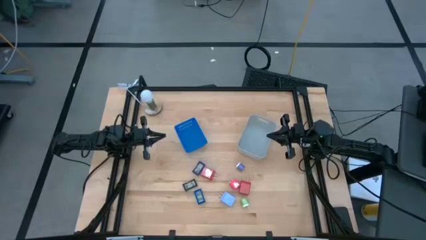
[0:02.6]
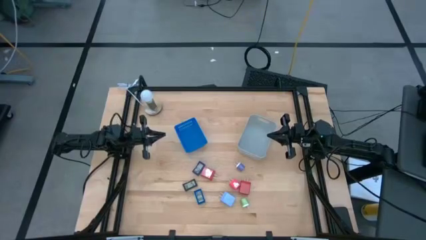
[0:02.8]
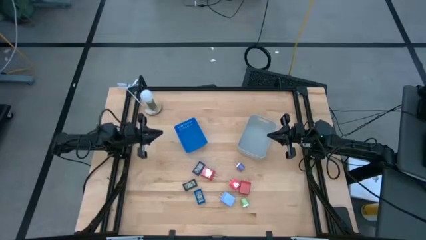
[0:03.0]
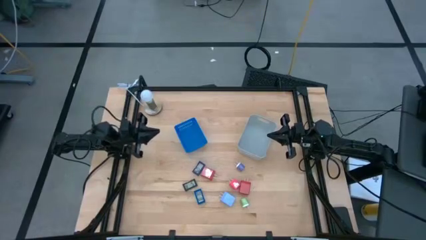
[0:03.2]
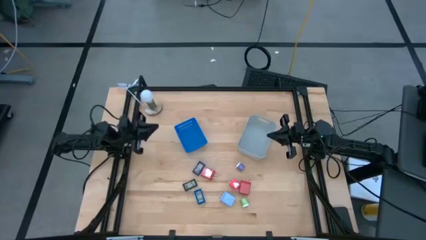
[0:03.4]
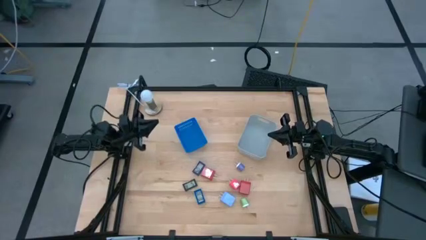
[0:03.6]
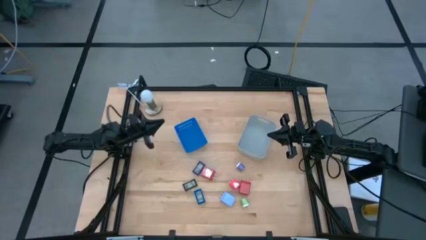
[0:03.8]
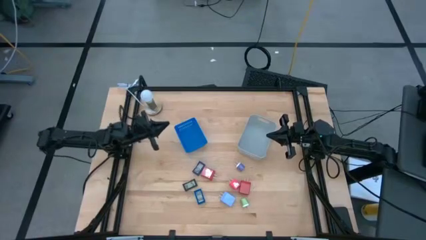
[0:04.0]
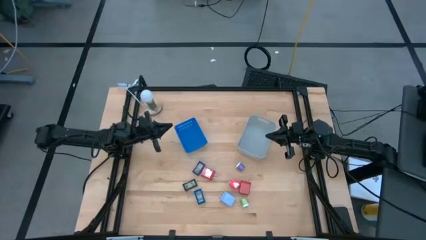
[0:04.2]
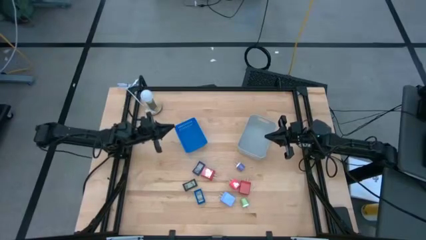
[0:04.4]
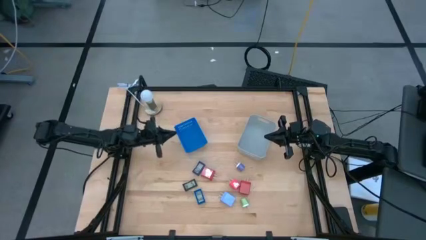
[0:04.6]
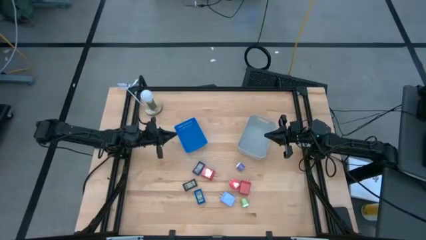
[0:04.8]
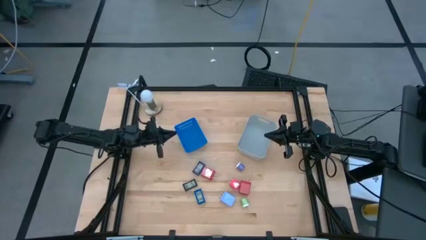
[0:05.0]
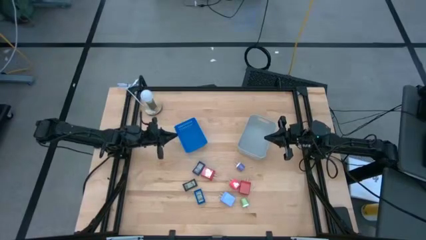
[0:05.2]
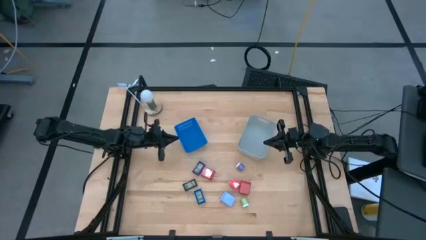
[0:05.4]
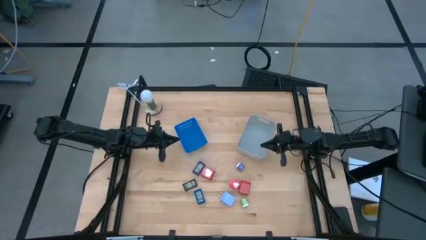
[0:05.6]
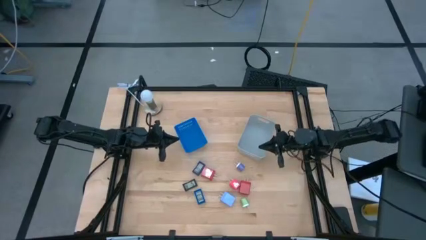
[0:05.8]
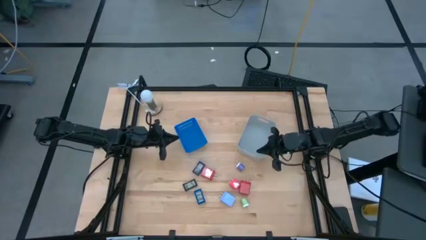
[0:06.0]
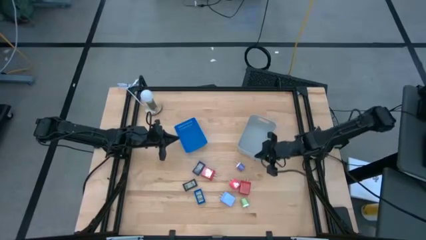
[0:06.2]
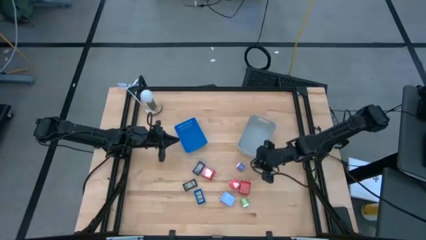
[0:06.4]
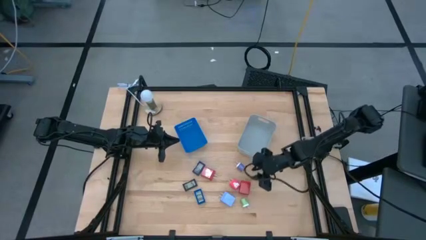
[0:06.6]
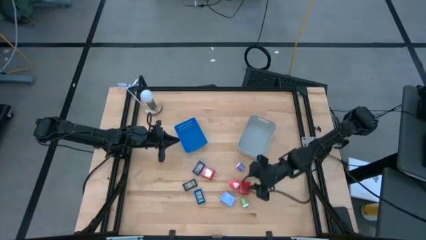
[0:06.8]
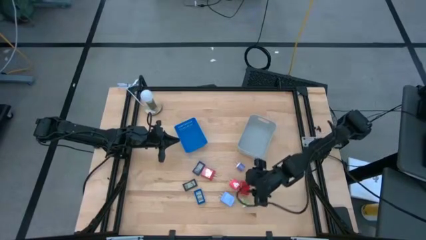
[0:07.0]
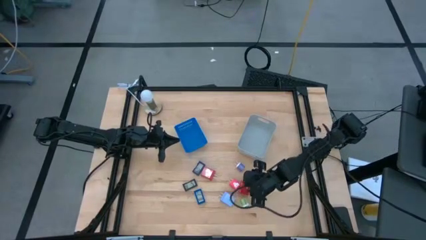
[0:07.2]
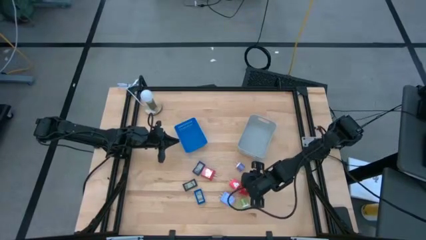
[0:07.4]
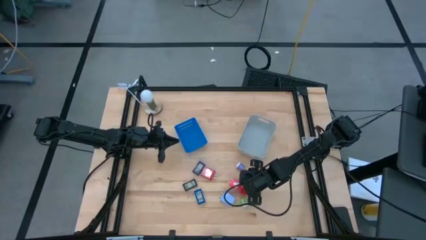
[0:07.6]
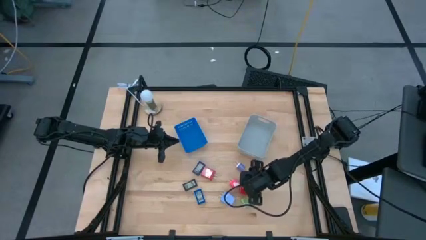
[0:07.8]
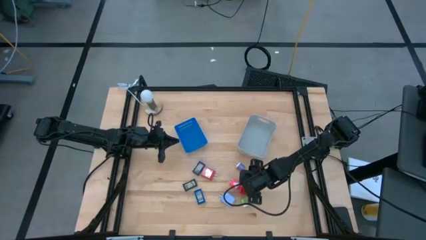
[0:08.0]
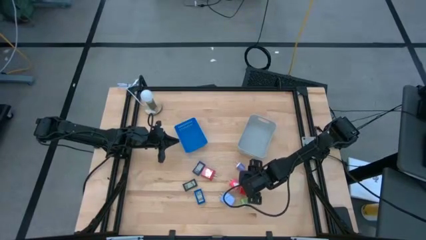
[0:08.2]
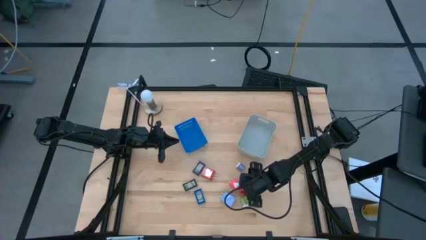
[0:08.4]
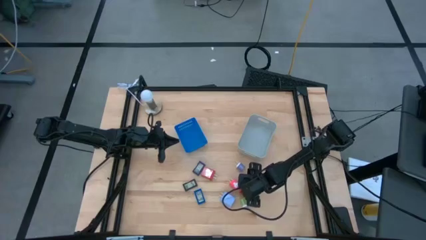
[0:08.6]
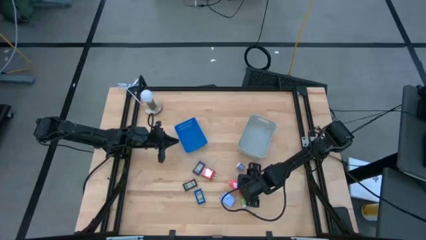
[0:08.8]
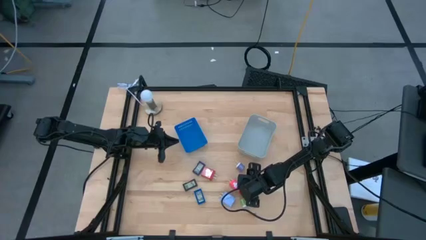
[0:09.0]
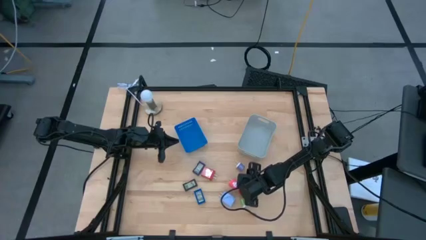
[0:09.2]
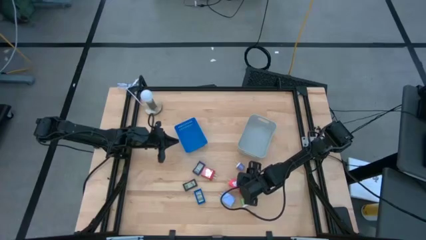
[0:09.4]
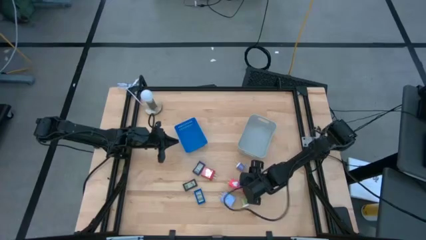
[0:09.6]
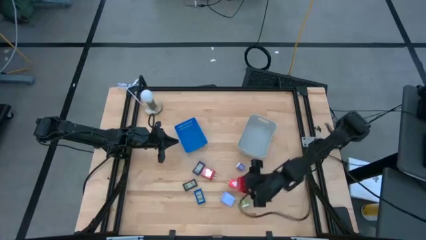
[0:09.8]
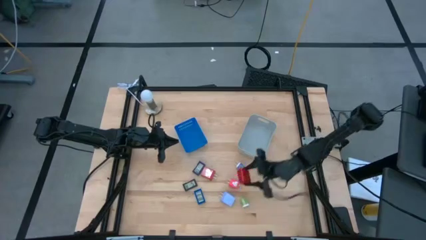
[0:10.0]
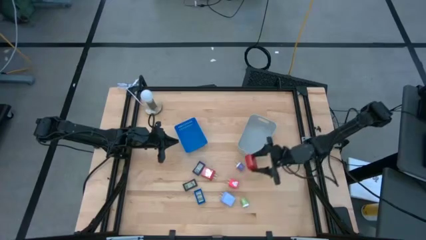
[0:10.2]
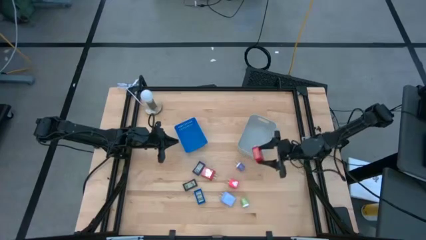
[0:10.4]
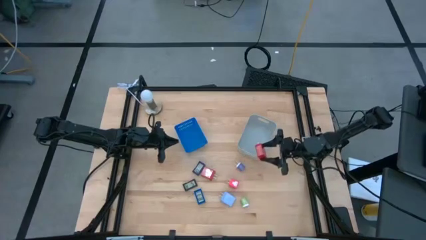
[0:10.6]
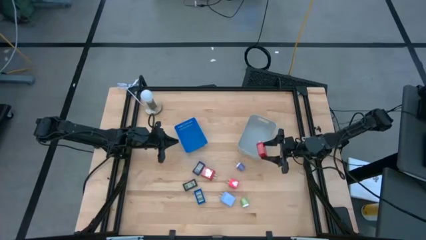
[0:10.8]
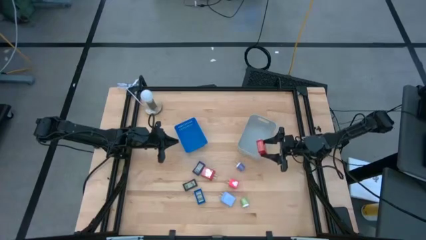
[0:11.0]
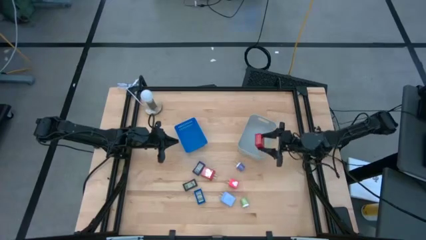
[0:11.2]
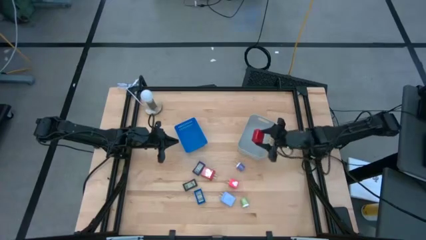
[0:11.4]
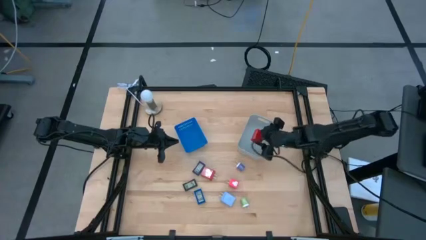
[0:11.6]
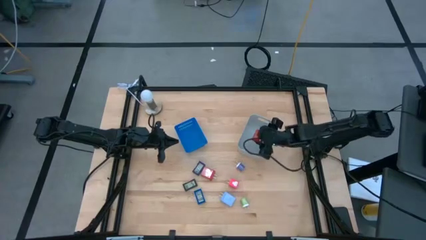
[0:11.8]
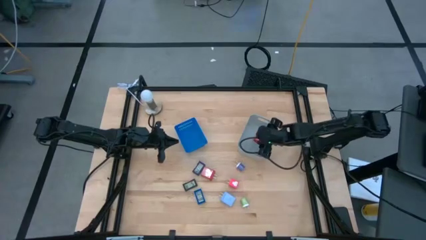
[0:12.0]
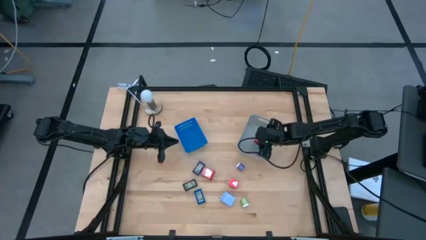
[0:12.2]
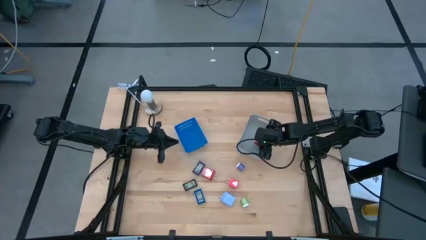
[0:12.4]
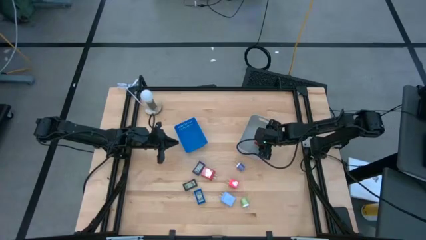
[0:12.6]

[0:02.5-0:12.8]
Task: Pick & Place Office items
Put the right red charger adapter into the gray bin

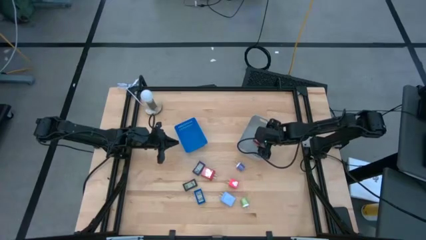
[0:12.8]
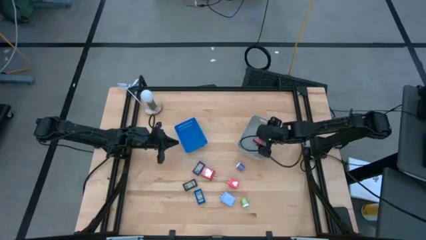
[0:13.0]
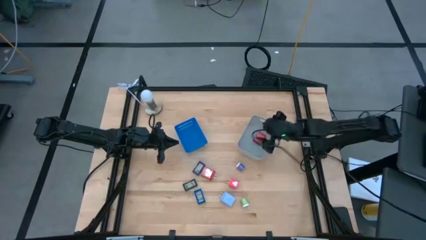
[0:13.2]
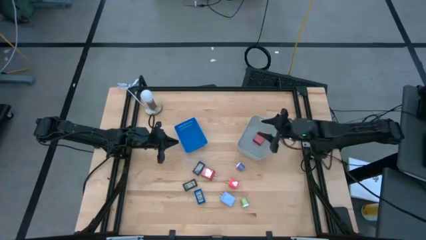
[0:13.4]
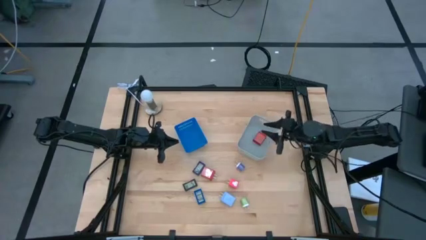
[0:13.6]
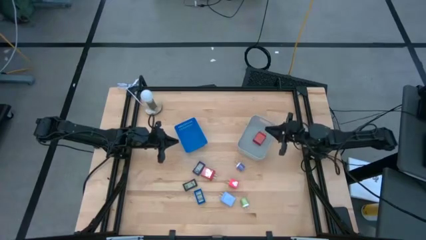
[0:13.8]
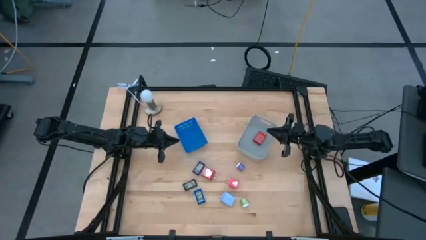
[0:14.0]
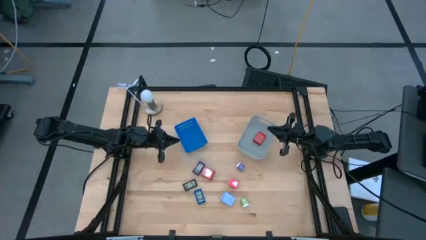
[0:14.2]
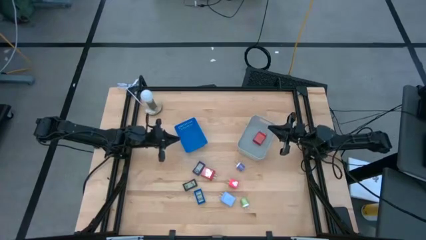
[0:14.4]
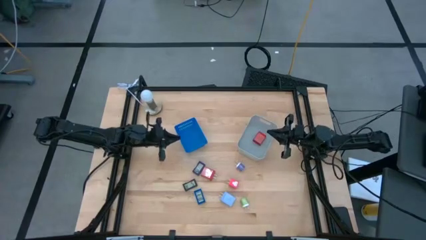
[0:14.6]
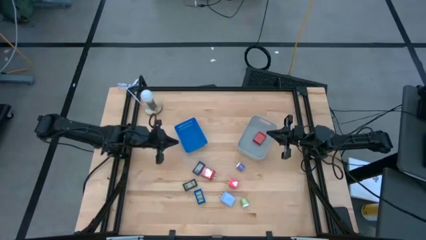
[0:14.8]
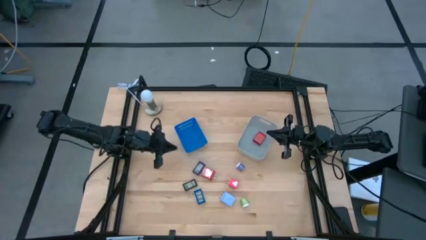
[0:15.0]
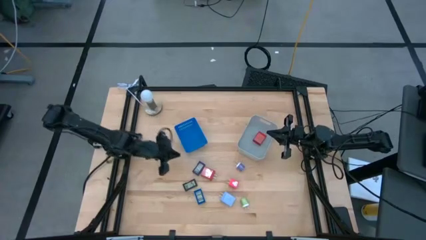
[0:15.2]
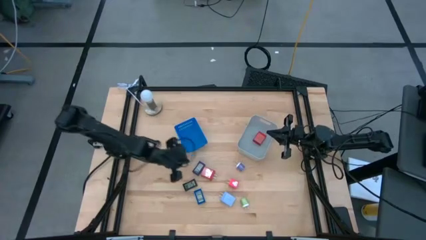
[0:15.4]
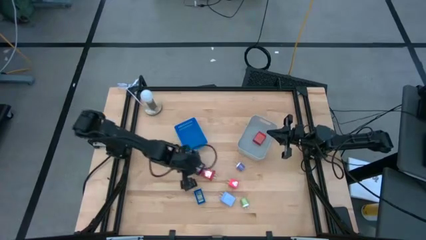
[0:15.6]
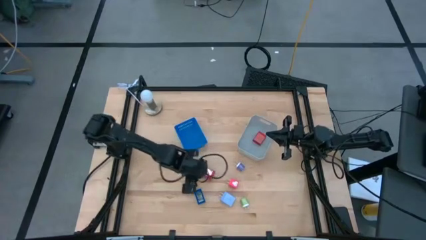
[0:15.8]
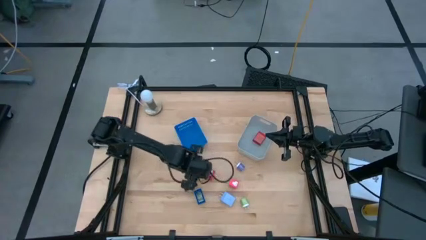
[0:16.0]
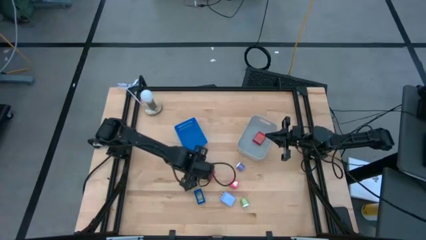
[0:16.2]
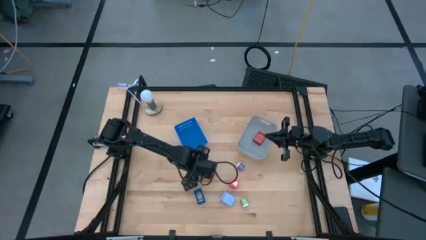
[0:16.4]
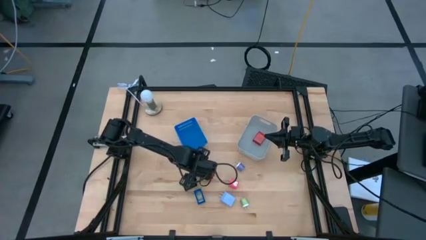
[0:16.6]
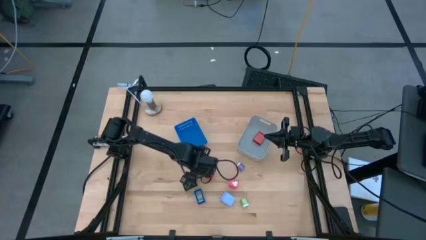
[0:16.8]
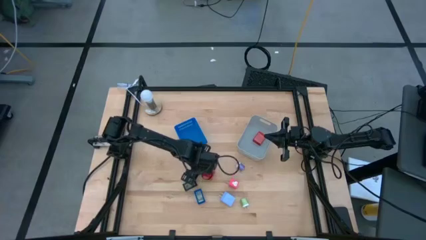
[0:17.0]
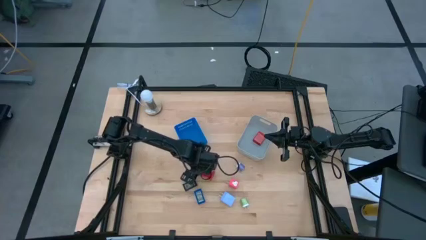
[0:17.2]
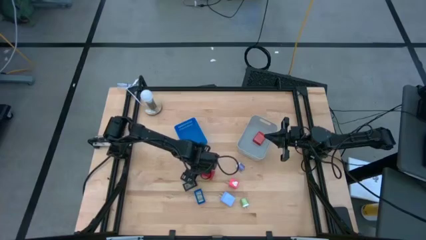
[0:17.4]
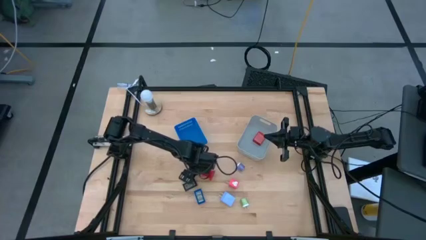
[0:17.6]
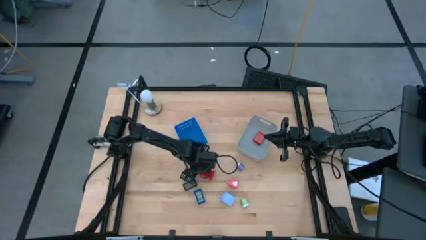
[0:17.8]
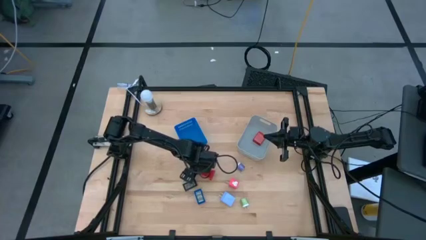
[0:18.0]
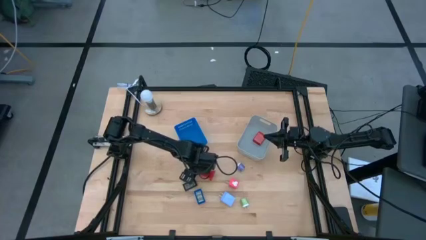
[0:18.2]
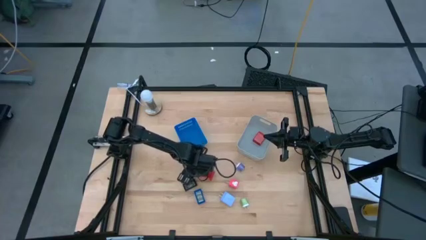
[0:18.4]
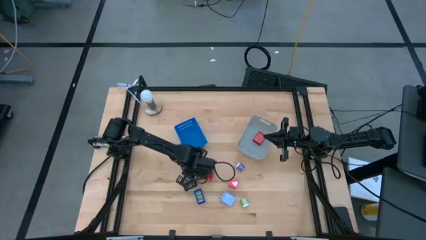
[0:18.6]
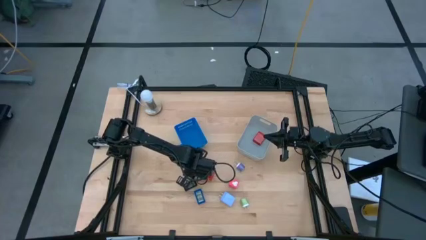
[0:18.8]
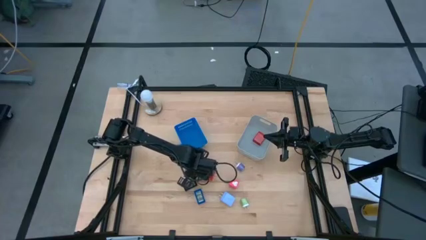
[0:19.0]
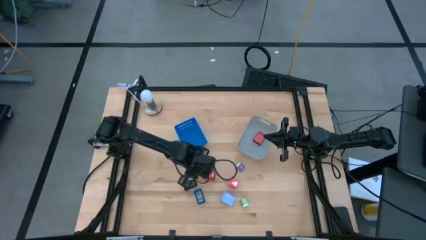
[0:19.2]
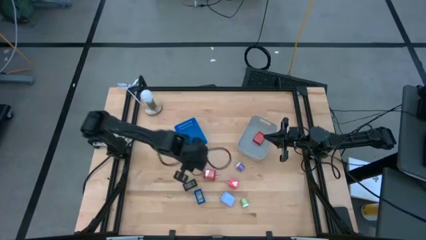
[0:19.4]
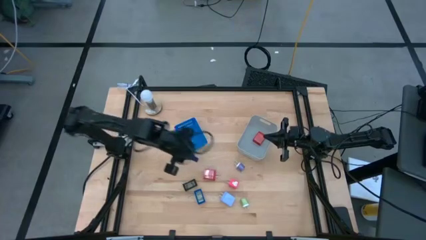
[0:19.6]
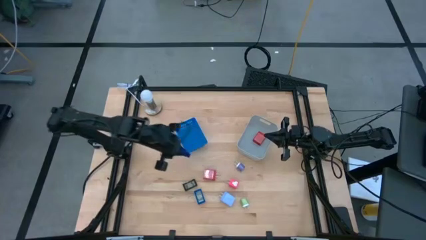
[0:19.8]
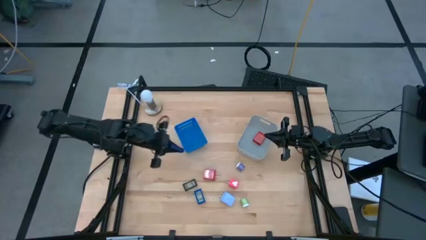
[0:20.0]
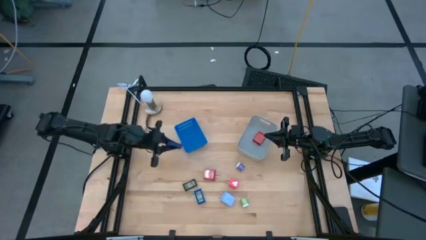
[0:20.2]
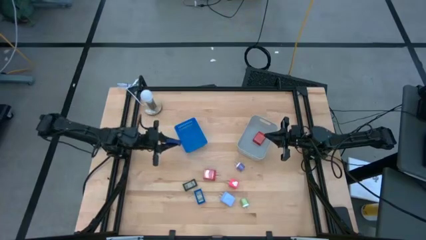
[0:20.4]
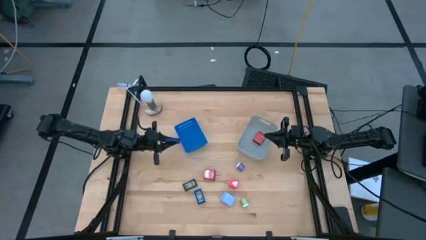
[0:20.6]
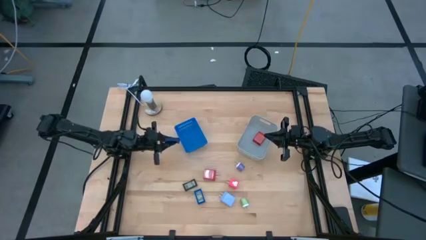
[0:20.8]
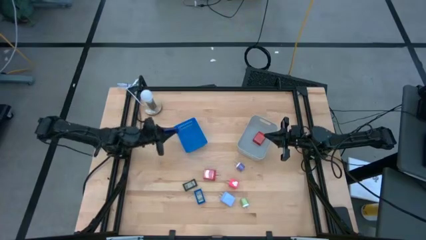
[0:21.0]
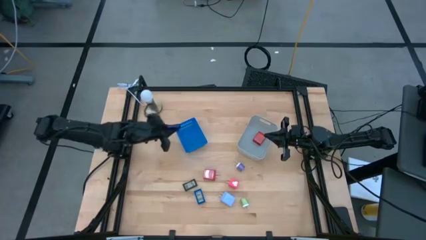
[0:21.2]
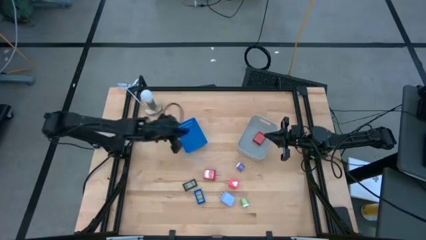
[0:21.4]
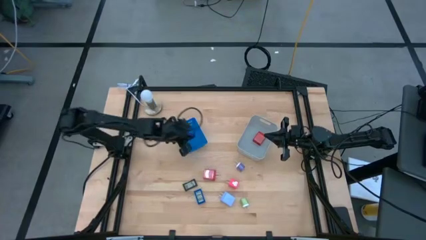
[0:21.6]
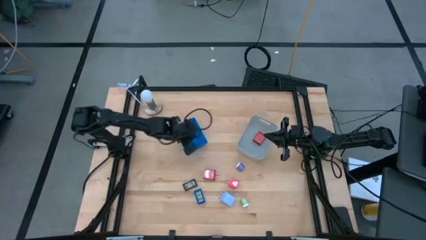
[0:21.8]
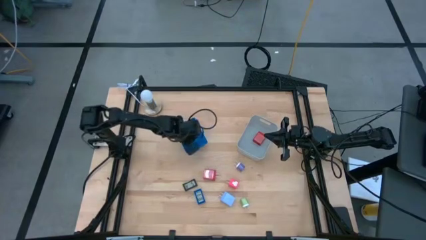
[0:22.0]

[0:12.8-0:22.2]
Put the dark blue digital clock into the blue bin
